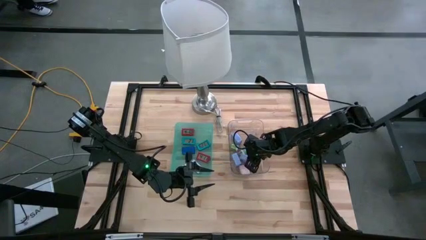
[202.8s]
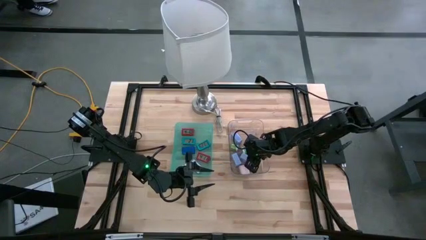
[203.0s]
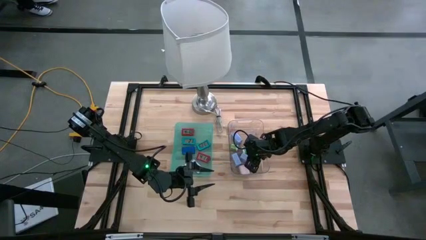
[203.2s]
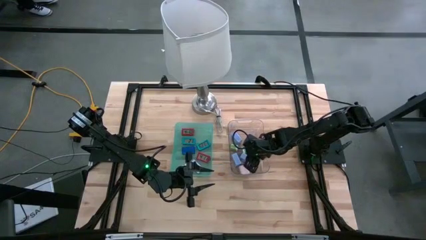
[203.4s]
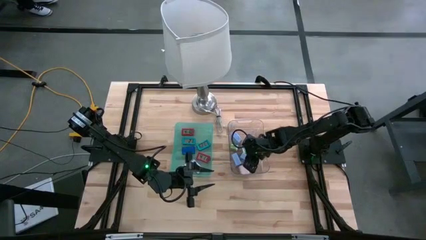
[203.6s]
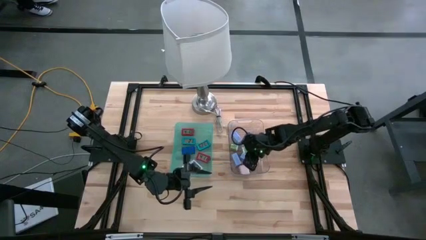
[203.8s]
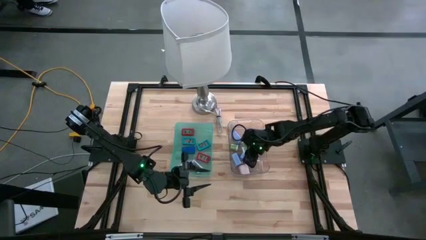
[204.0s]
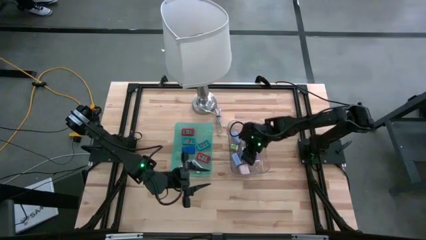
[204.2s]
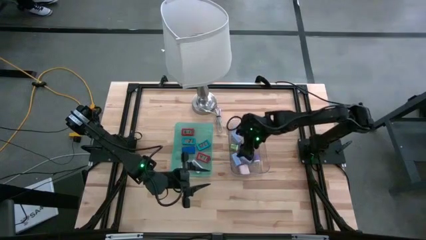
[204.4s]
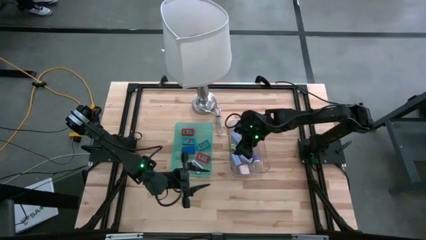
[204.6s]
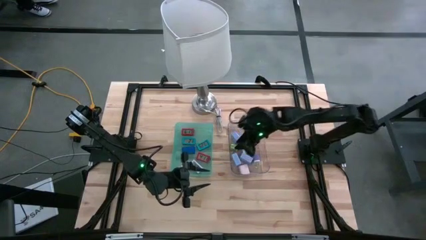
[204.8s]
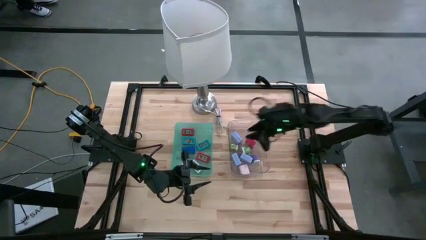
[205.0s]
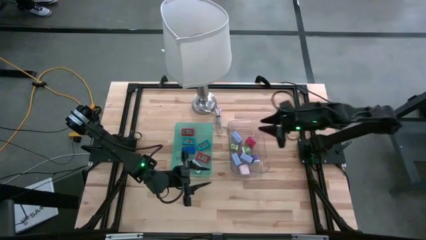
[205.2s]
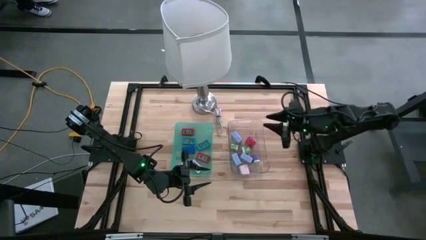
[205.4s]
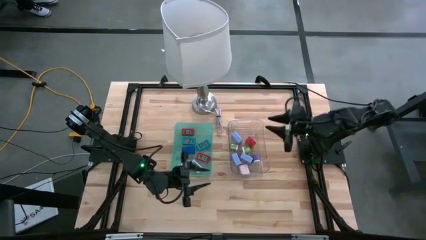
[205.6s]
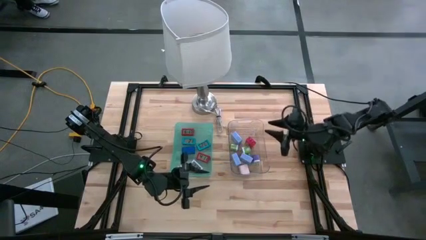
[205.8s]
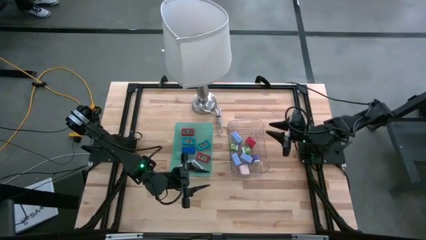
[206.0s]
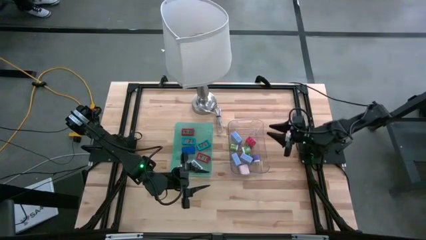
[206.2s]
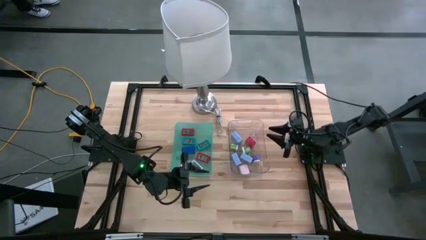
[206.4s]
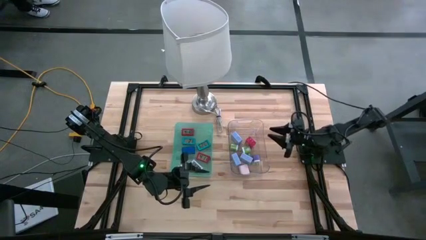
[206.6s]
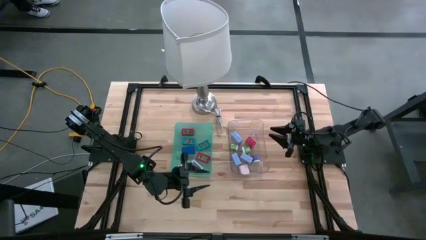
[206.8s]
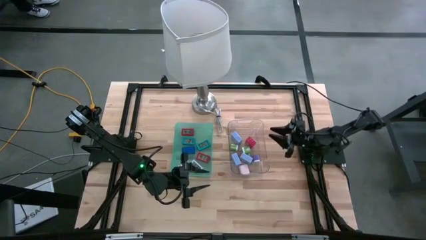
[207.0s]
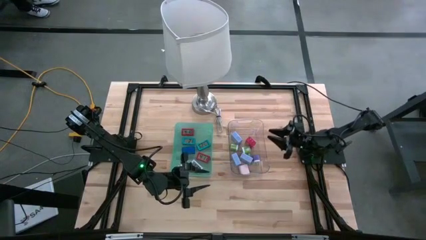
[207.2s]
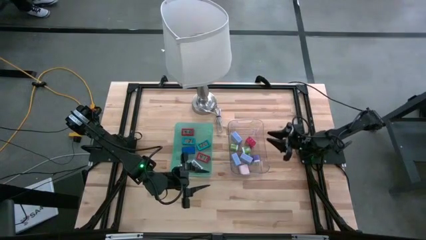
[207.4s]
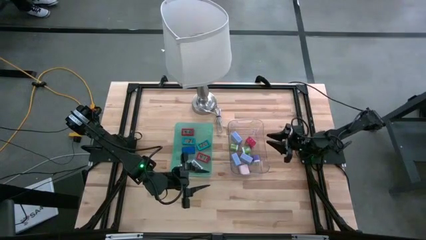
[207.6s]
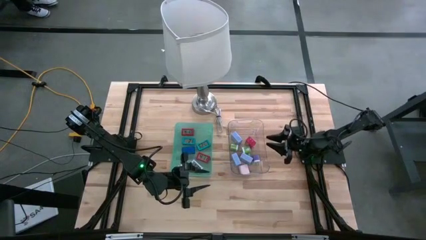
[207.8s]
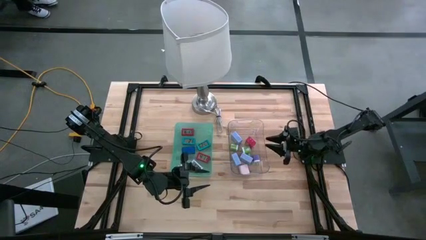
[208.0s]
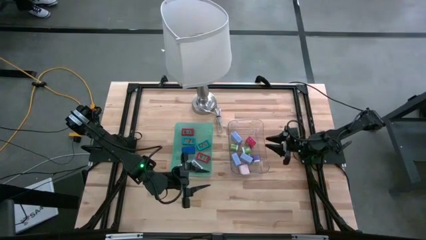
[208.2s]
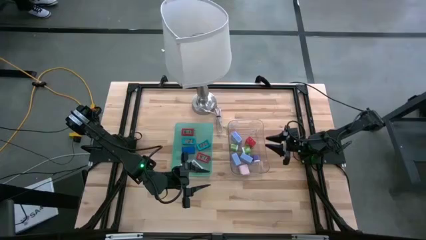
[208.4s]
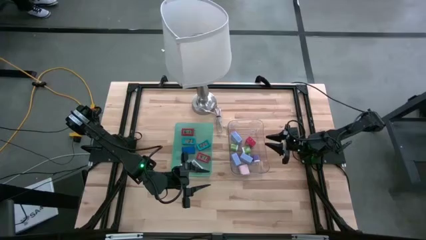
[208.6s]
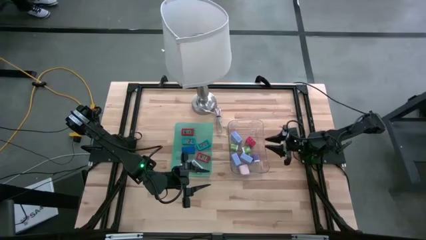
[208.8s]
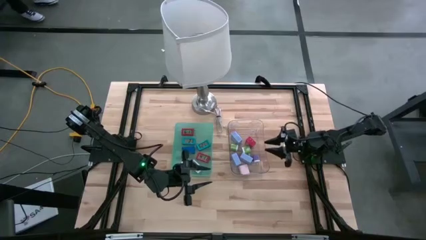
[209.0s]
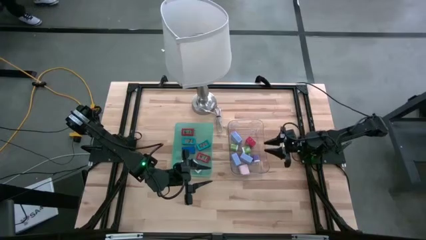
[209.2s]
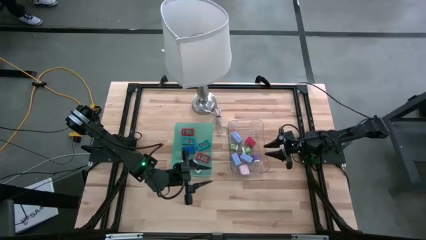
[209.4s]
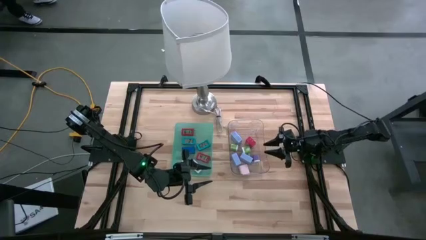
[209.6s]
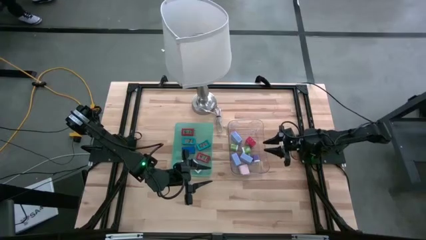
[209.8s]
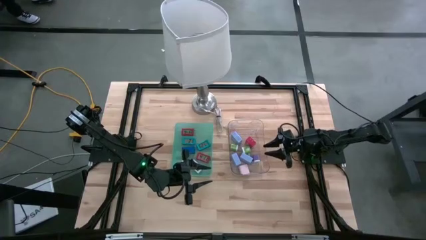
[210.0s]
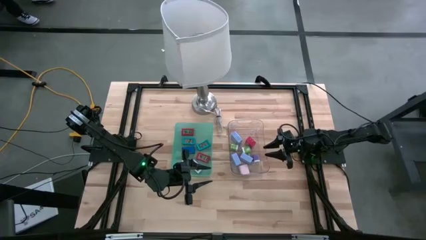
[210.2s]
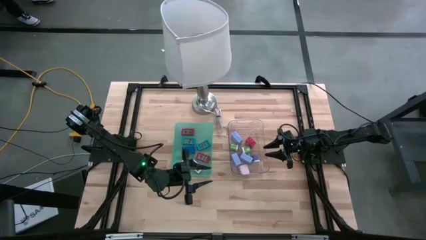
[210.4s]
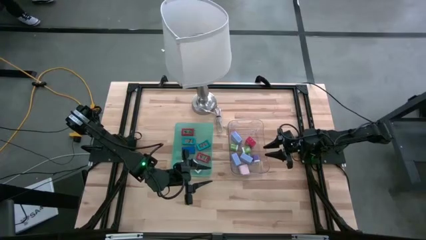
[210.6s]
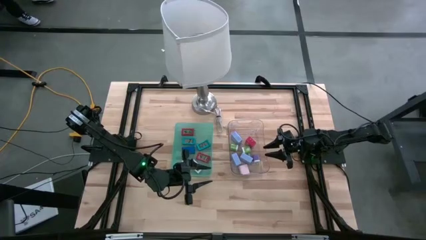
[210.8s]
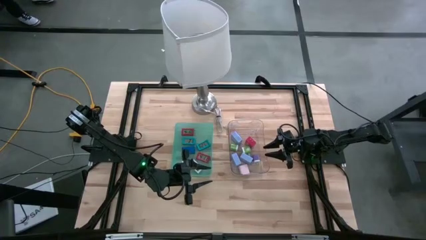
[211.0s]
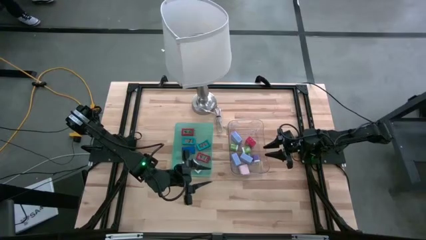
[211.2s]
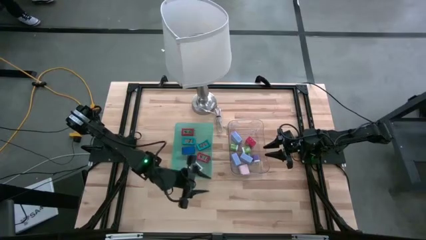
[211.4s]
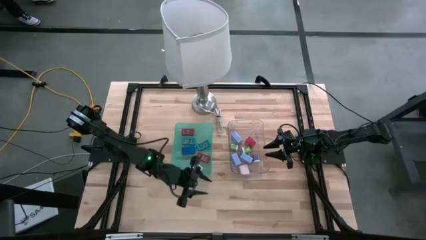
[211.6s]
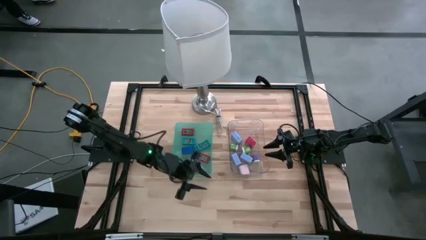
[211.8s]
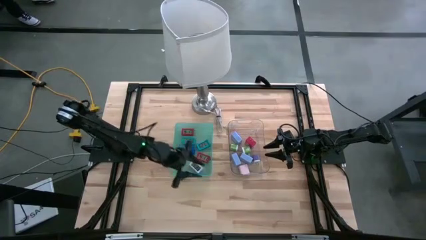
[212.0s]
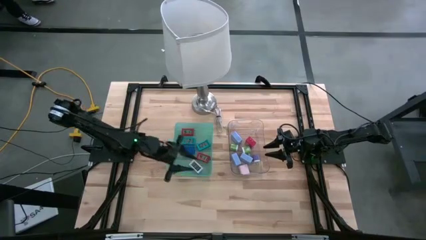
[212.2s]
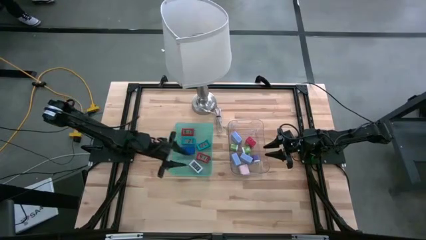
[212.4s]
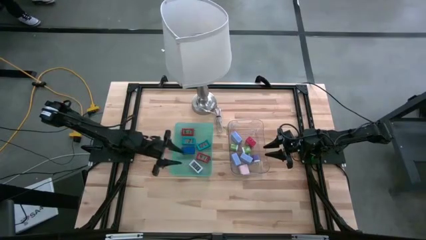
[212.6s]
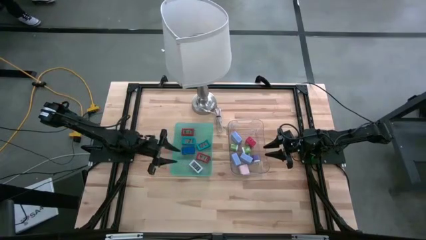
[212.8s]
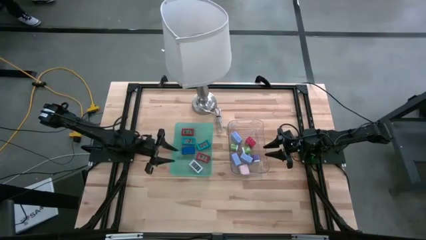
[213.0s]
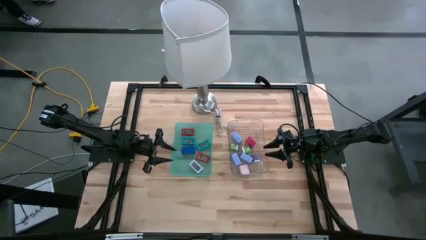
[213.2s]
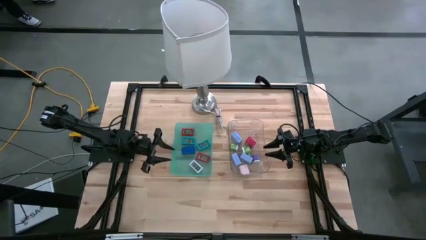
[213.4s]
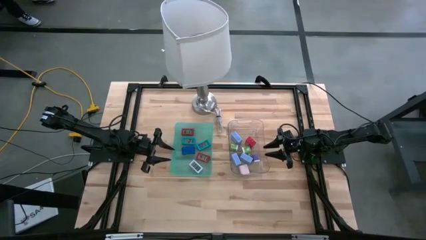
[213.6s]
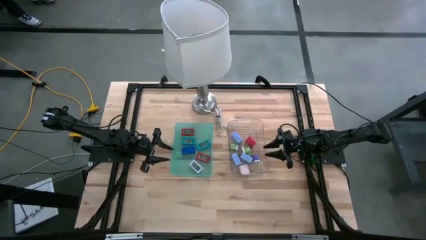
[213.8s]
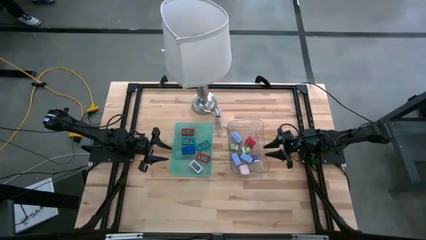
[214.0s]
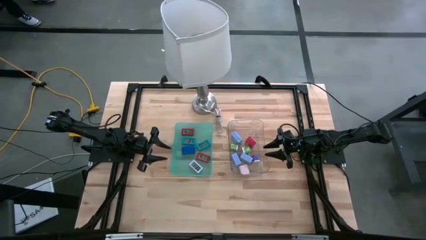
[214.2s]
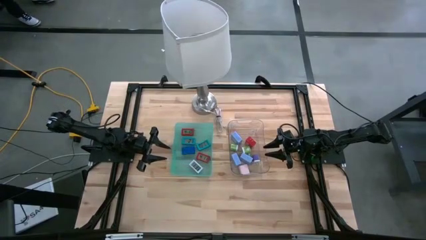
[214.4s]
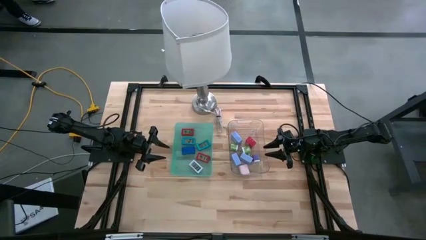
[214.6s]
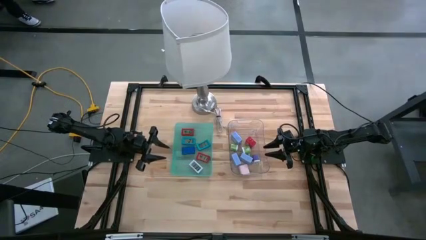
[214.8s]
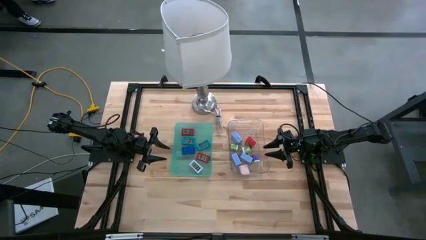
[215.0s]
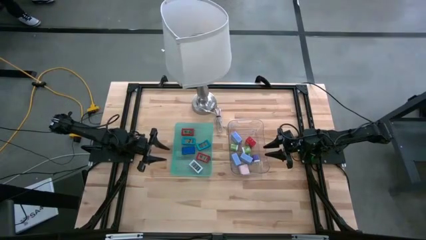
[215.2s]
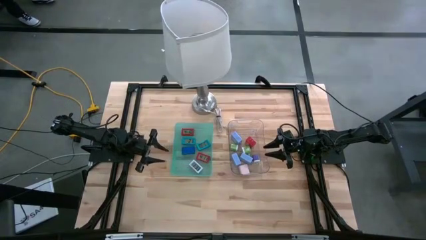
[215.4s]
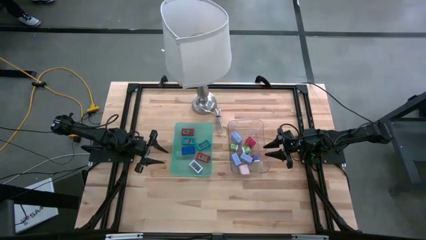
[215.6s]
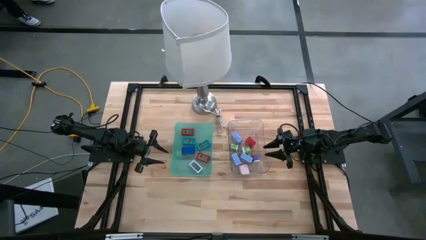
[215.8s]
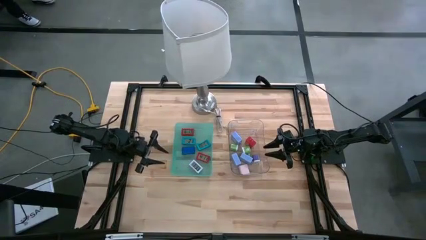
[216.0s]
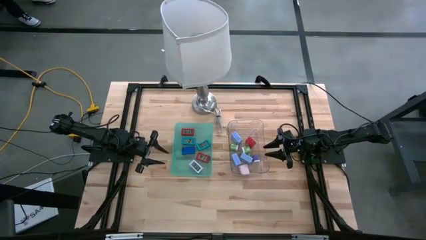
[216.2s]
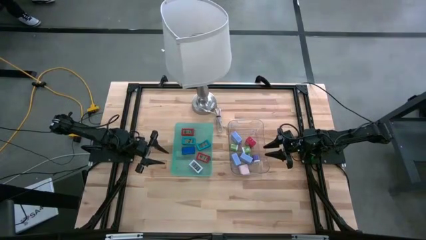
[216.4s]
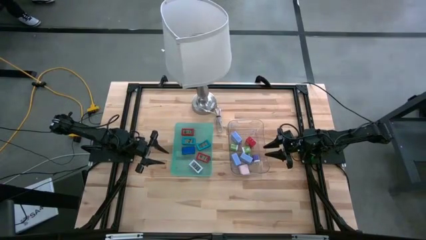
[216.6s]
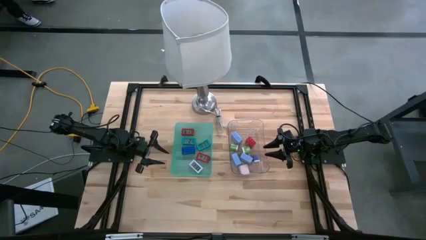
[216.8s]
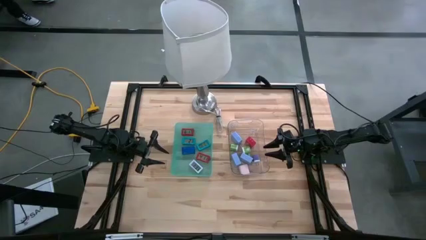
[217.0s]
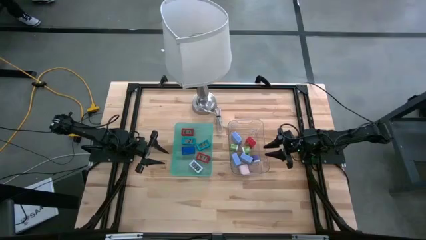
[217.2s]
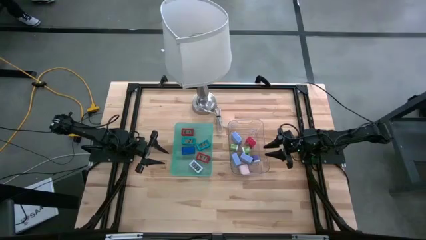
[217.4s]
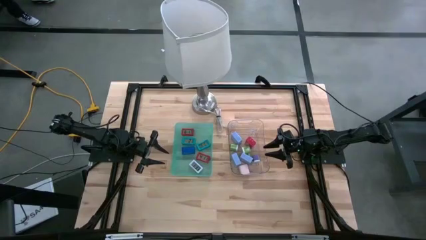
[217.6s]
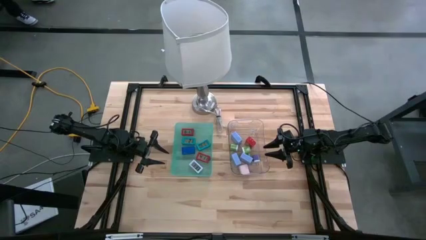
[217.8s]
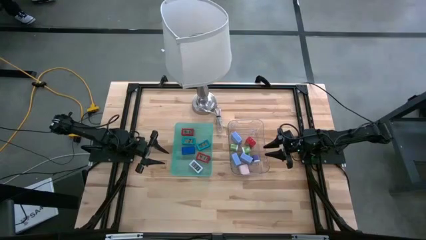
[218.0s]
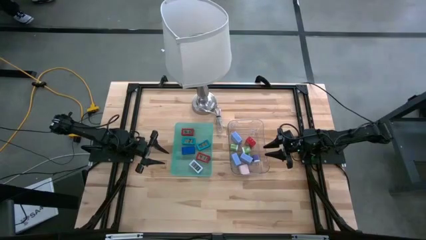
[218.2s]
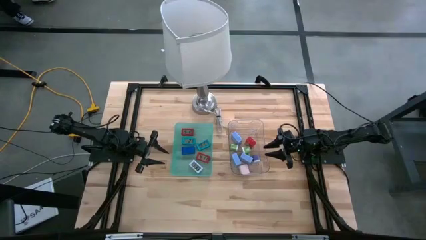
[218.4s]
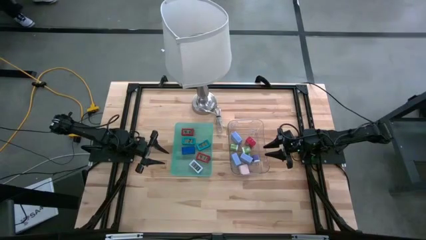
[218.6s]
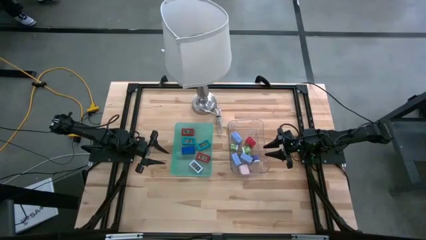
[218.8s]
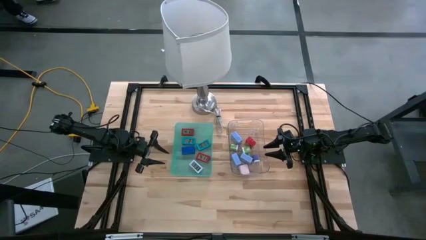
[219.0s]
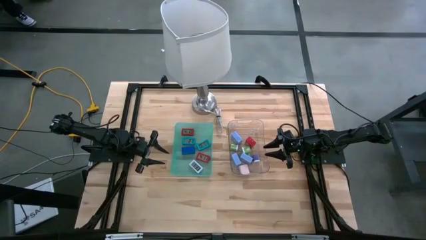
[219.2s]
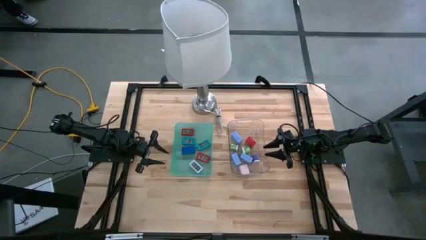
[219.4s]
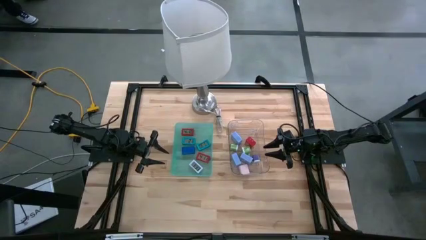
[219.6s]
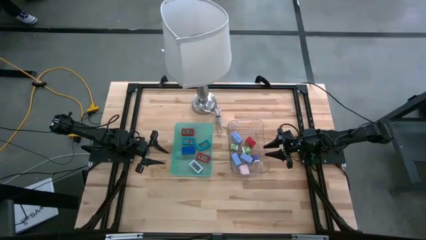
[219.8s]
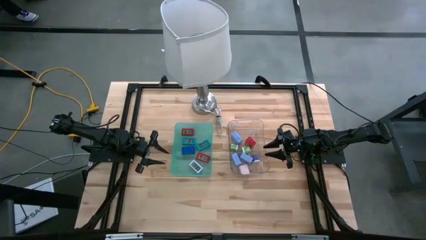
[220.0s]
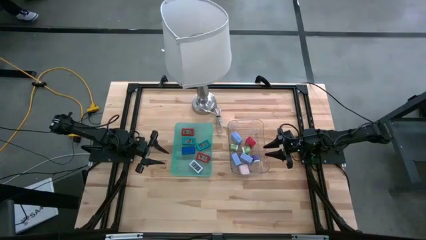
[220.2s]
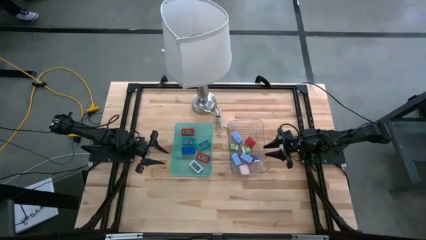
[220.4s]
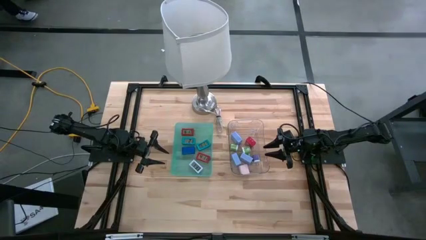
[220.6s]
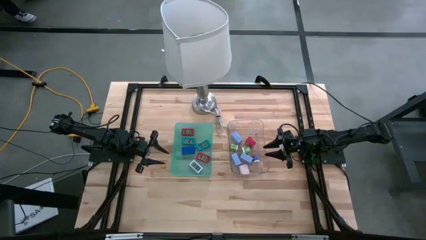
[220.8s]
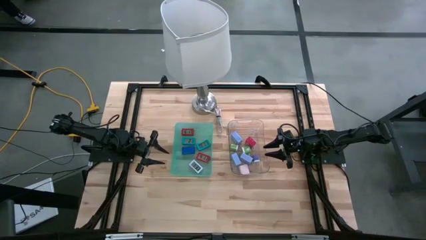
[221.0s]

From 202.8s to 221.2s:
Task: Pick & Place Office items
Return to Home Position
